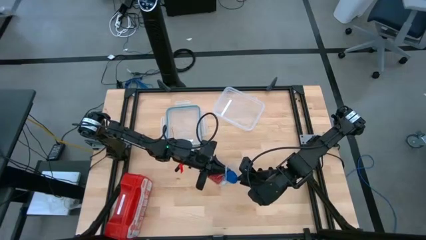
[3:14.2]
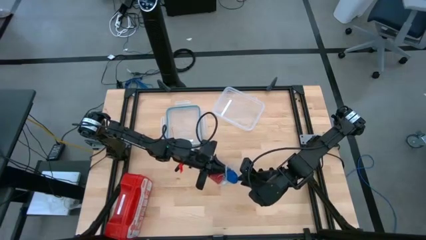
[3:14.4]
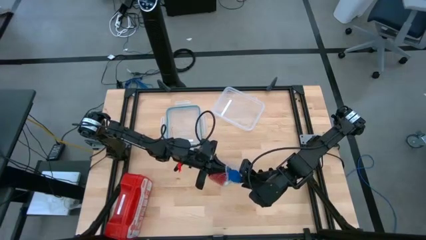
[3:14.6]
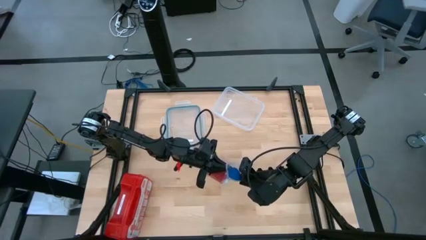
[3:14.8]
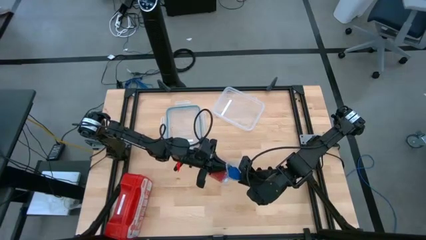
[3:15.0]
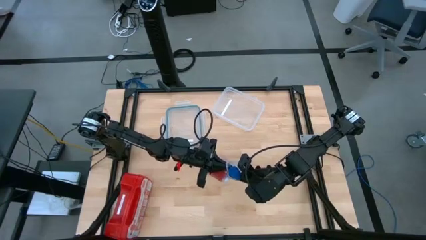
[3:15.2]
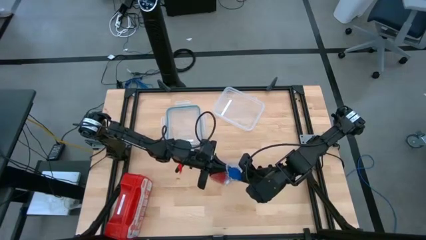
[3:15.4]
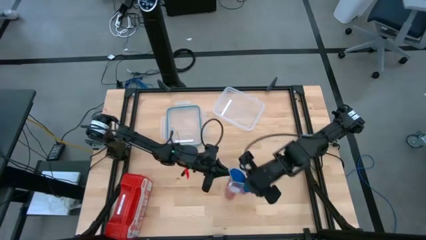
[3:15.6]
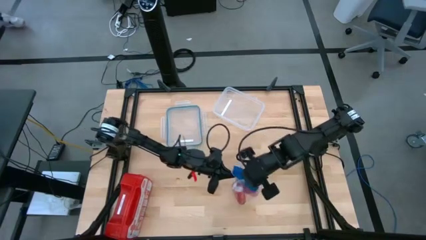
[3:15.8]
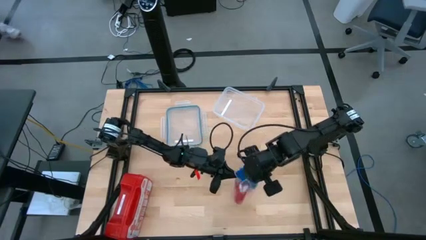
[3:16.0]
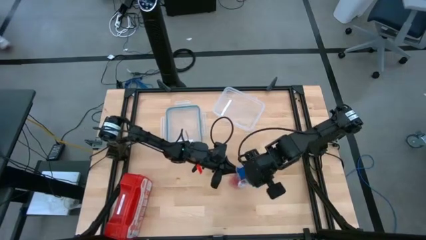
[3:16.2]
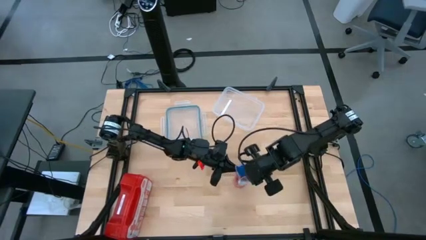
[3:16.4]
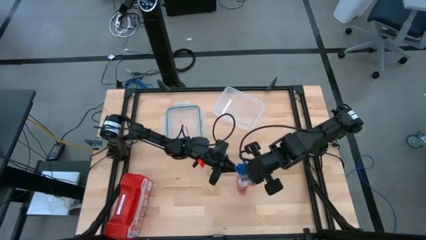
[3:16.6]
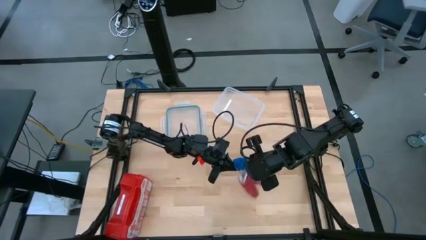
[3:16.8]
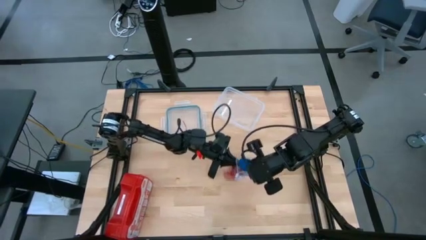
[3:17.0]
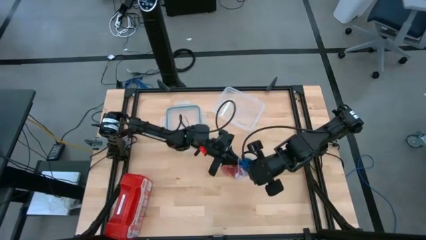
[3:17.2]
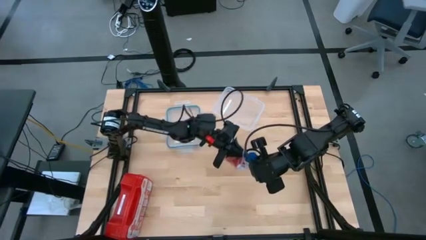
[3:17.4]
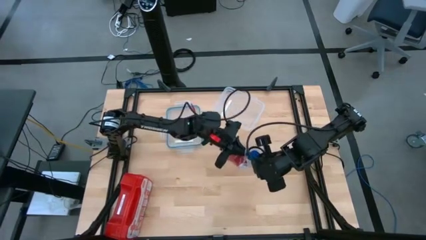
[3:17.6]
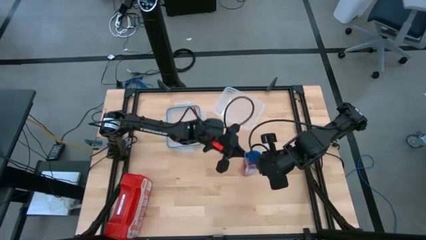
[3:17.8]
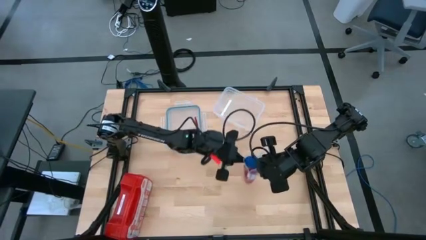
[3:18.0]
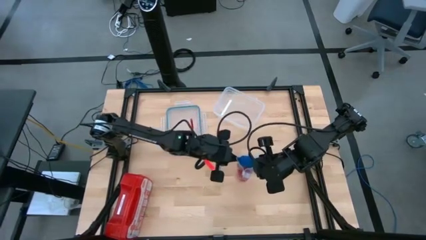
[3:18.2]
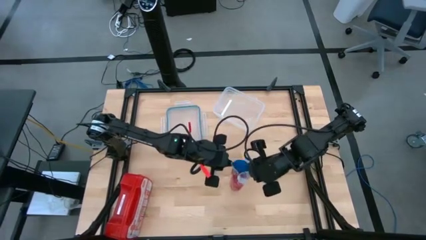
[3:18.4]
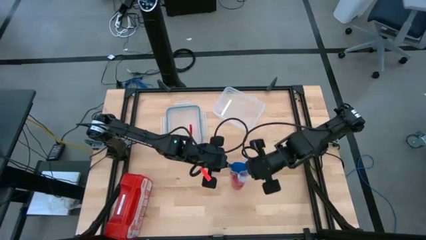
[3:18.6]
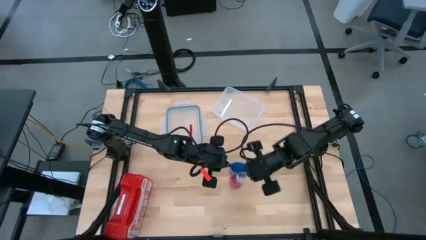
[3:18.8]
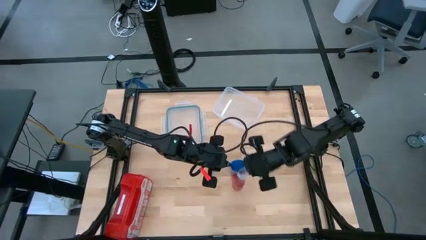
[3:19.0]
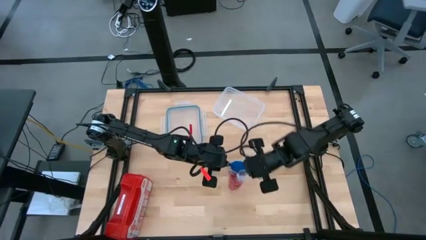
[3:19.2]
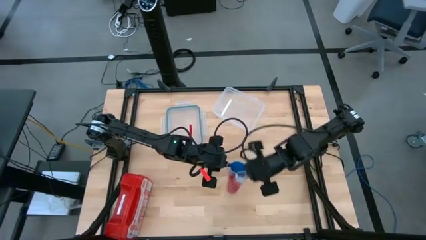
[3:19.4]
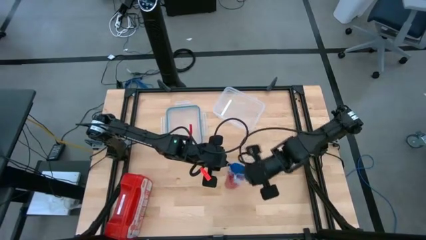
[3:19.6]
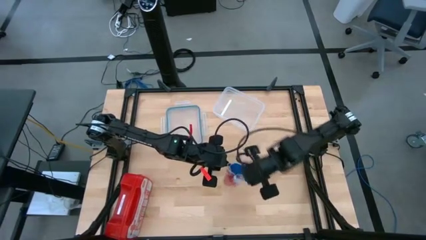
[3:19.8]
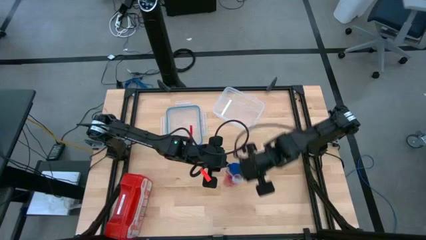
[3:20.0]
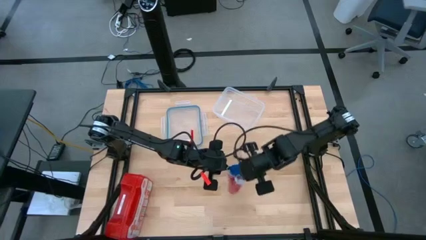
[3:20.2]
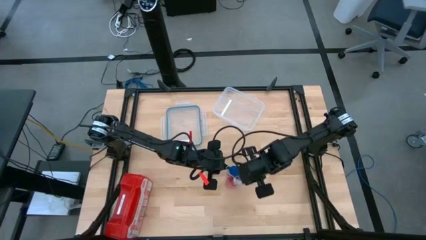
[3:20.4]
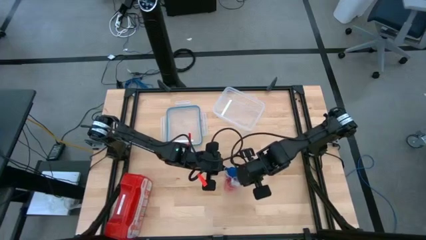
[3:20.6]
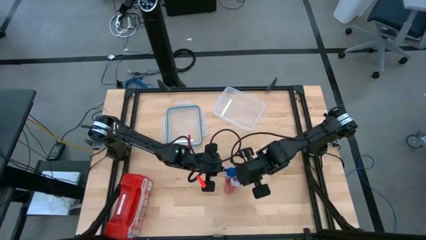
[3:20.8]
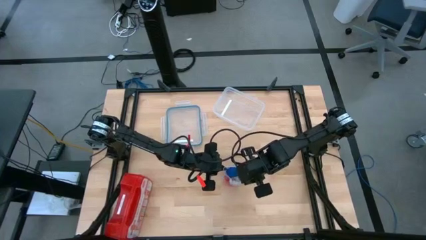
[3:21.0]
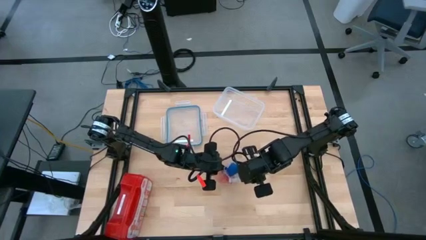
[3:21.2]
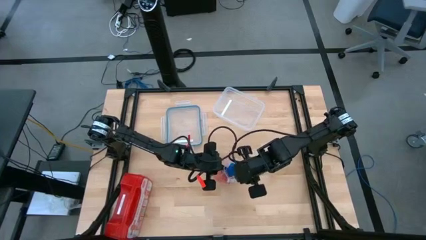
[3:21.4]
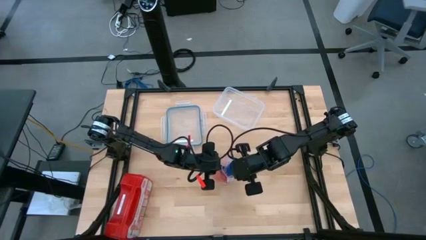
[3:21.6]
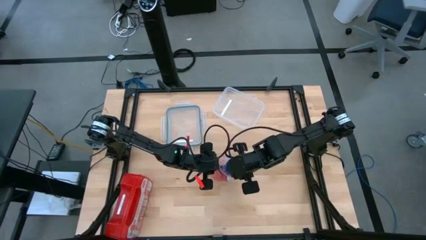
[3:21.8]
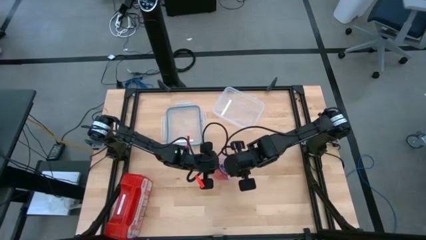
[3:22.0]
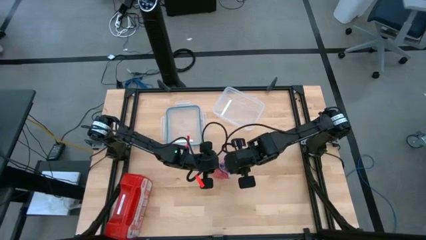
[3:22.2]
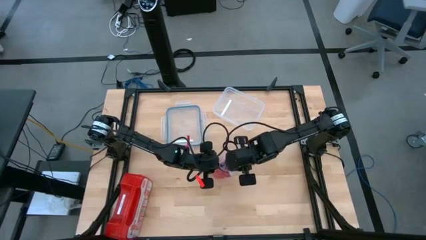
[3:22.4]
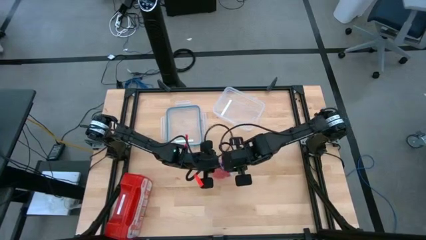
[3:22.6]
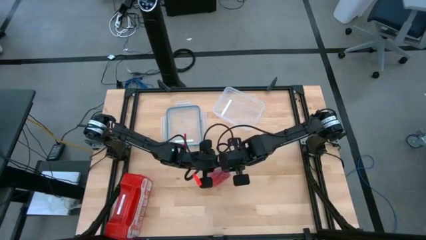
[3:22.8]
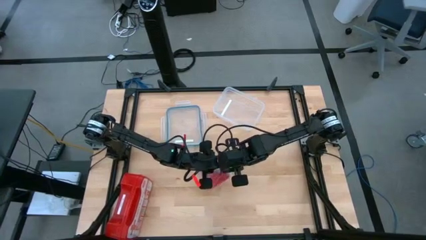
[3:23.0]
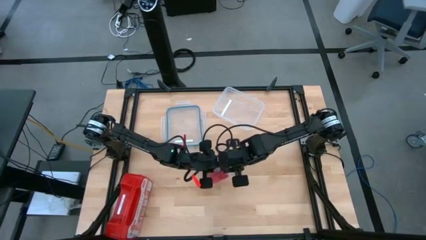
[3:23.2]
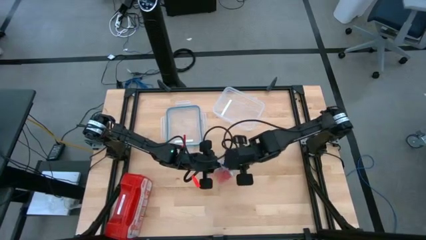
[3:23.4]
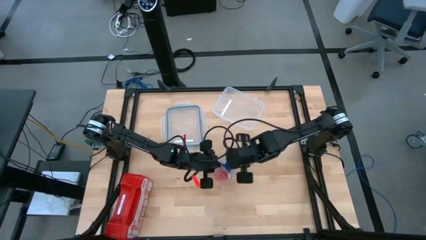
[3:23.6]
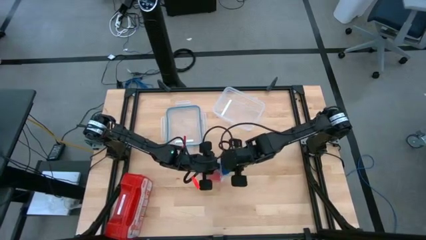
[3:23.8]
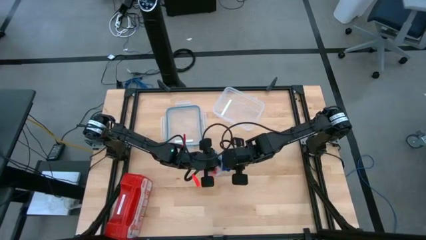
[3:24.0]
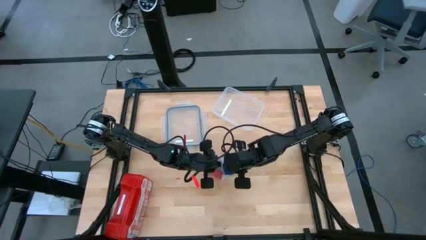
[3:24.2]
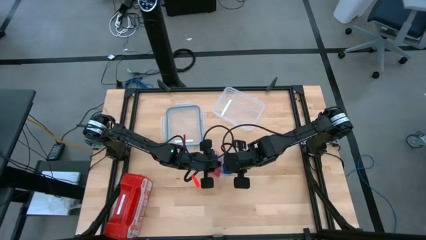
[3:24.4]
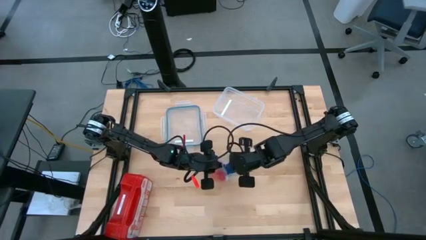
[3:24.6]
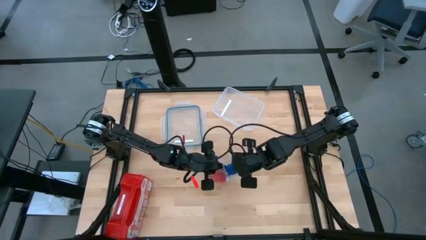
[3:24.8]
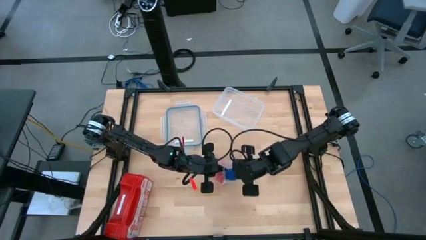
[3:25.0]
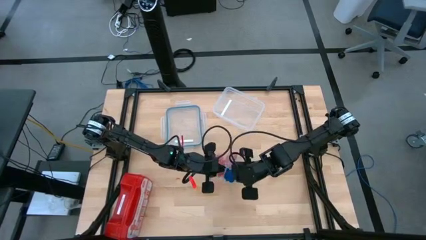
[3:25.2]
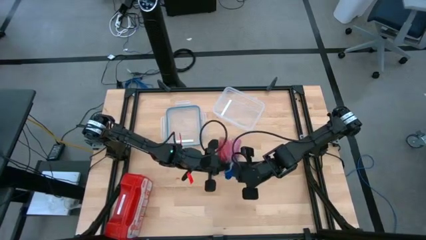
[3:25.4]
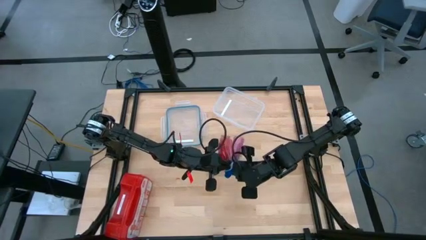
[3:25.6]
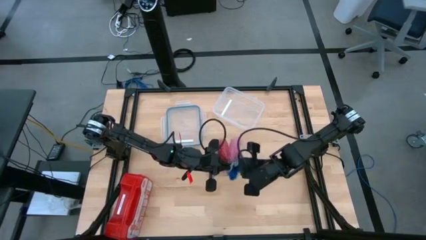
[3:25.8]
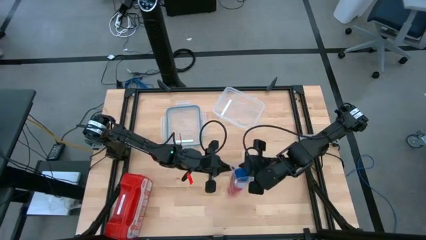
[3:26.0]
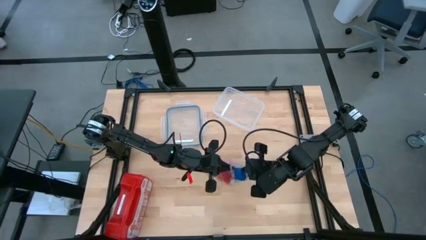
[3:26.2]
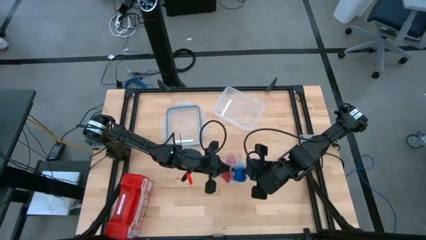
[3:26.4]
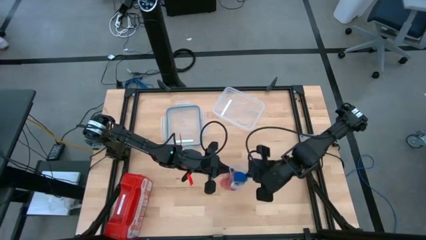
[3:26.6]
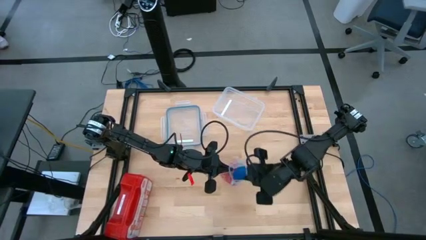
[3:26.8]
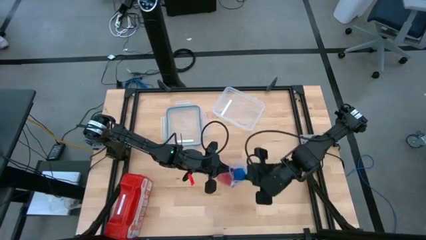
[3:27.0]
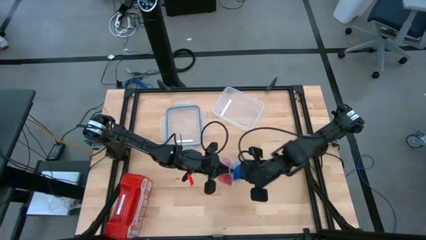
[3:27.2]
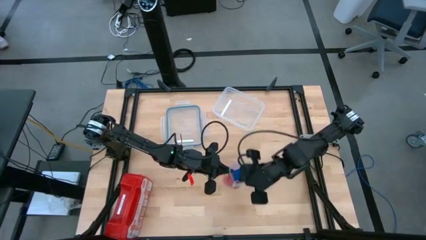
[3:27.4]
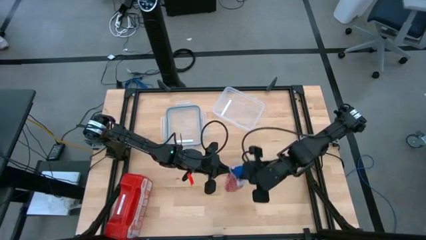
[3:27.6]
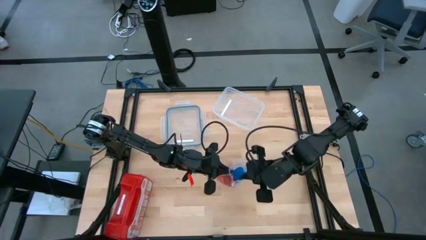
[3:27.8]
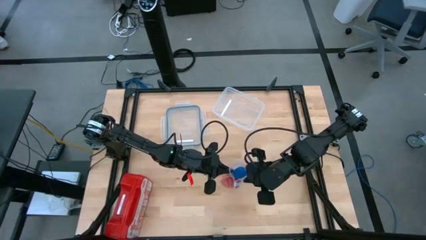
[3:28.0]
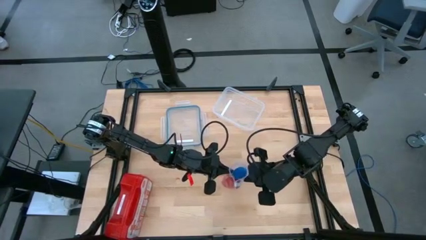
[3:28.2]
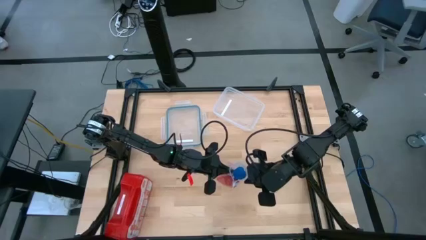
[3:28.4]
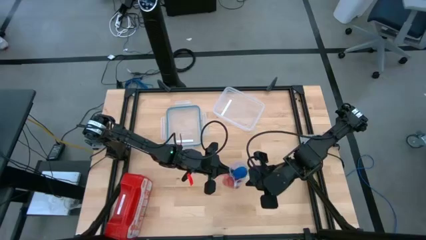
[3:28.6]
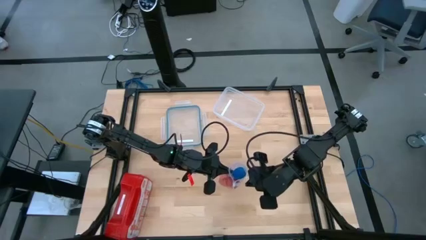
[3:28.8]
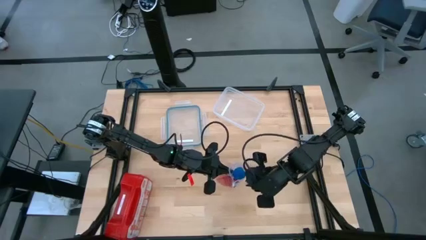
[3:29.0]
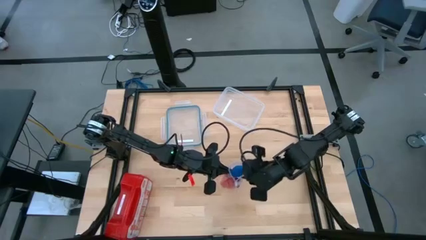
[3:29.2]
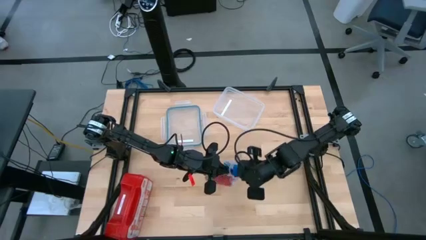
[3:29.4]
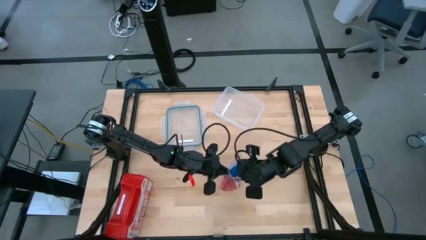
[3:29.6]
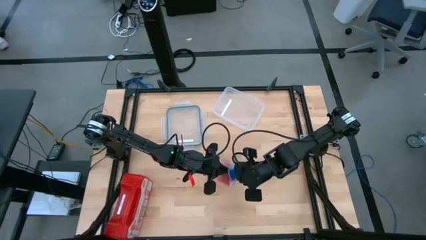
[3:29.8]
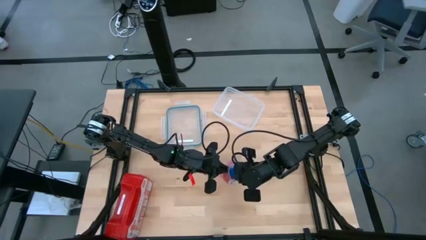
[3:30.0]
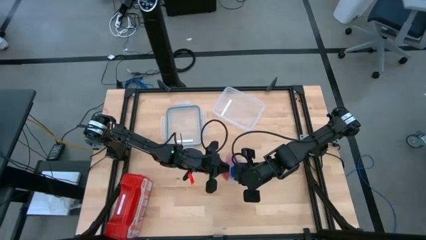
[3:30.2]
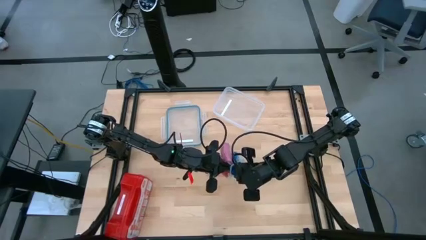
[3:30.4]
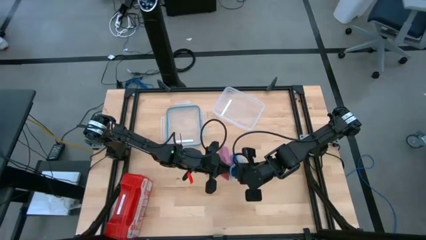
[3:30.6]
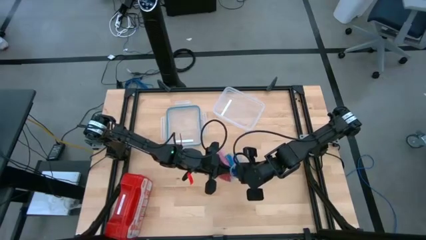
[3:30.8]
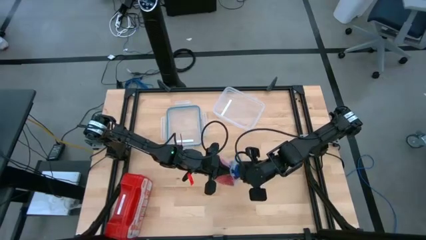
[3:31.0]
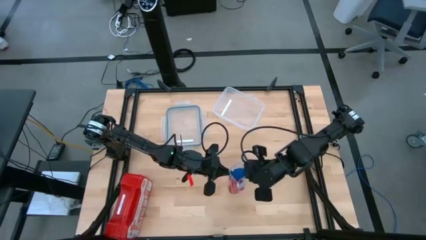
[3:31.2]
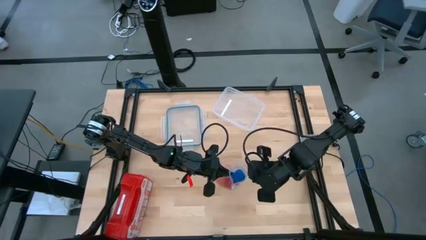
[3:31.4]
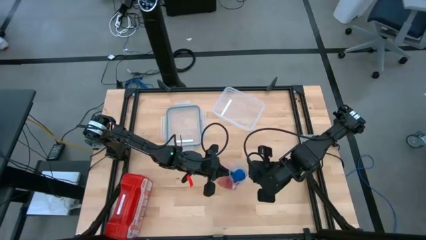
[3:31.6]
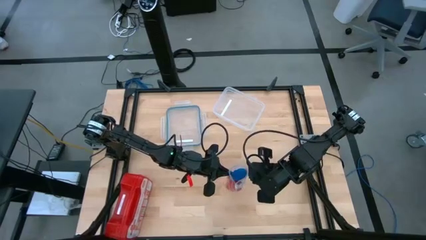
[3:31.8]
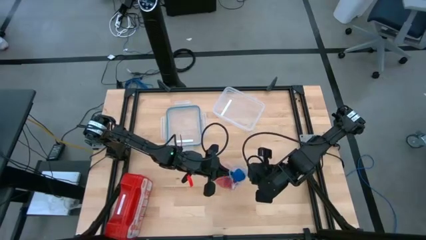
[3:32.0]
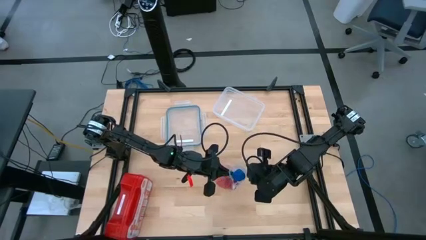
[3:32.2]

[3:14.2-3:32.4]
Task: Roll bandage
Put the blue bandage into the transparent zip bag
